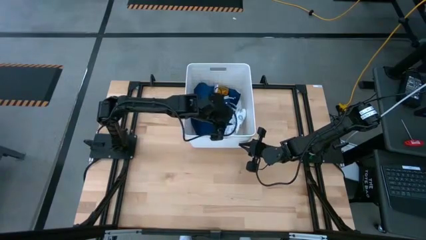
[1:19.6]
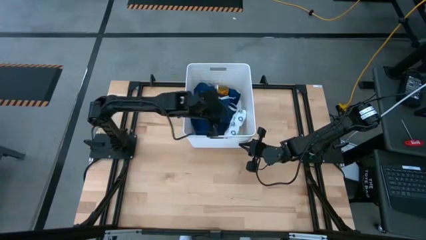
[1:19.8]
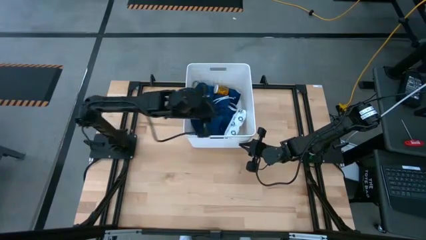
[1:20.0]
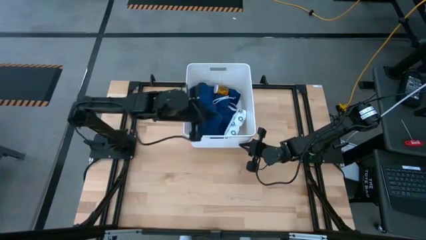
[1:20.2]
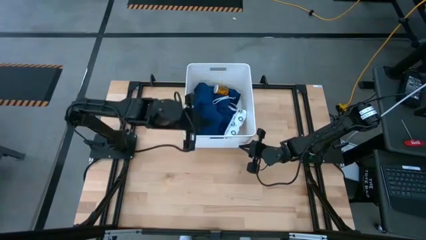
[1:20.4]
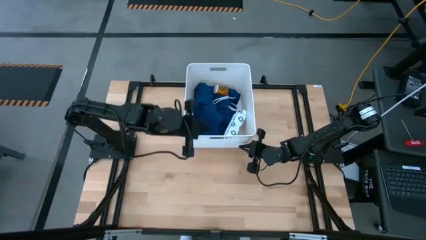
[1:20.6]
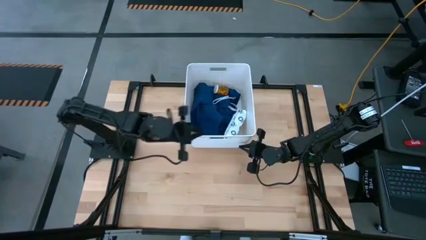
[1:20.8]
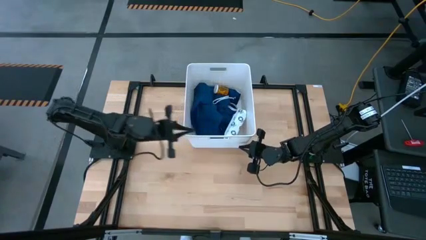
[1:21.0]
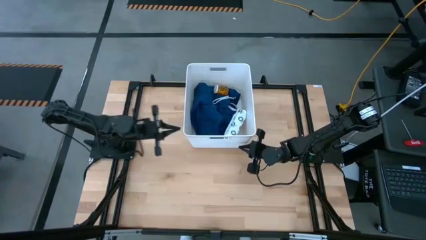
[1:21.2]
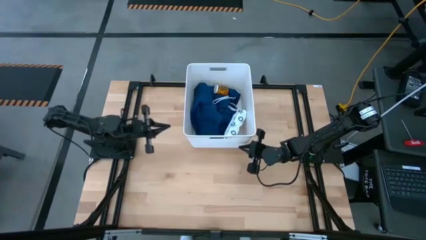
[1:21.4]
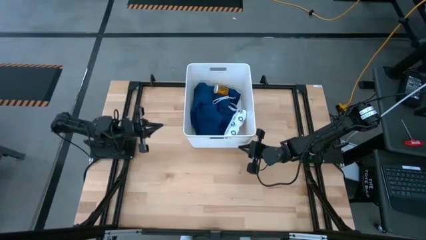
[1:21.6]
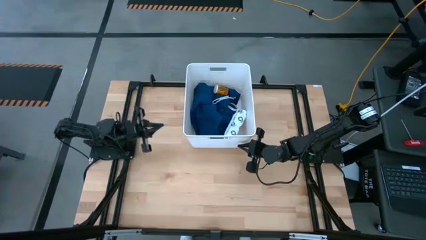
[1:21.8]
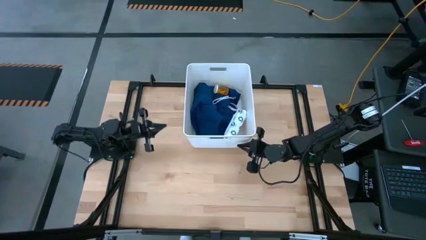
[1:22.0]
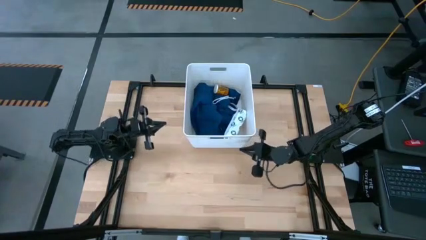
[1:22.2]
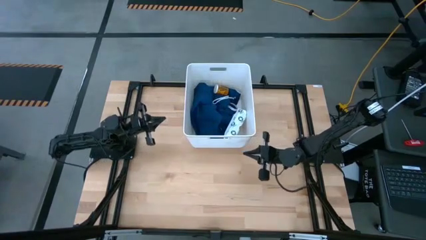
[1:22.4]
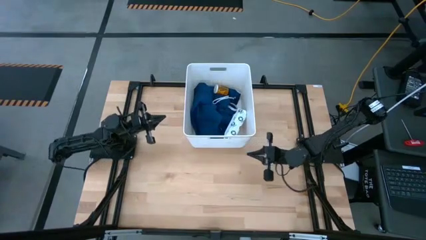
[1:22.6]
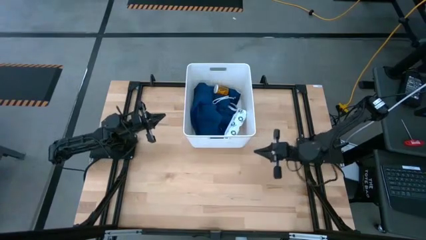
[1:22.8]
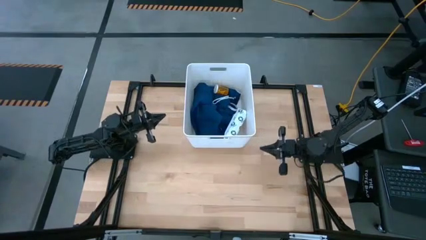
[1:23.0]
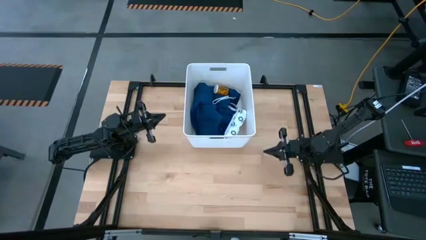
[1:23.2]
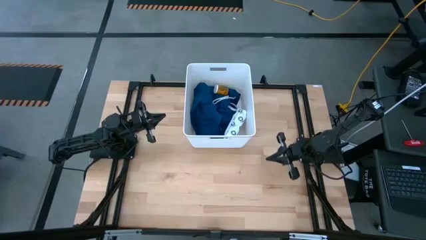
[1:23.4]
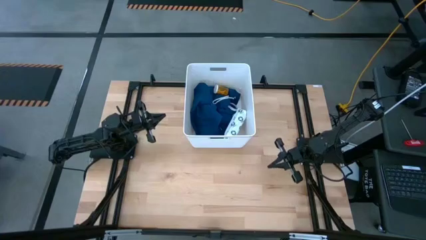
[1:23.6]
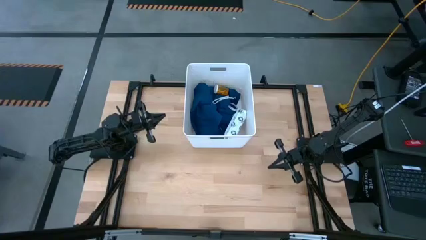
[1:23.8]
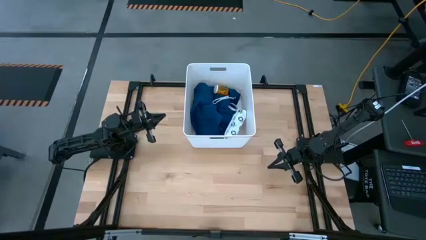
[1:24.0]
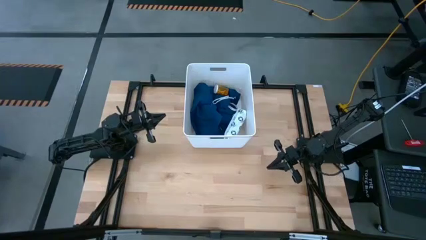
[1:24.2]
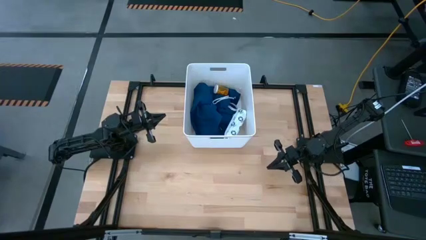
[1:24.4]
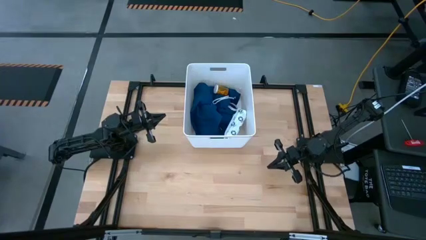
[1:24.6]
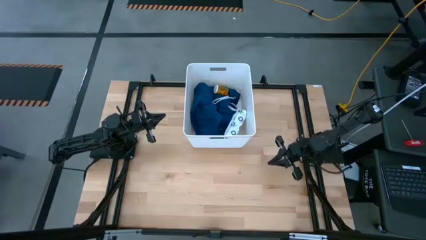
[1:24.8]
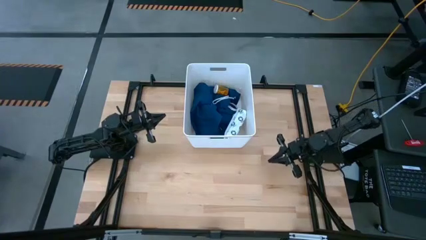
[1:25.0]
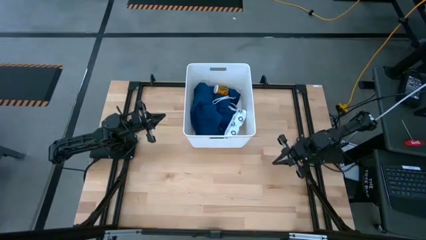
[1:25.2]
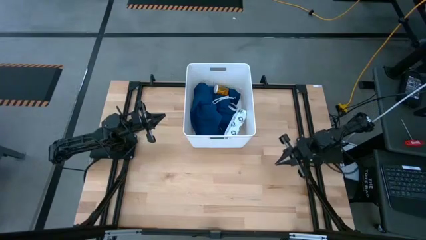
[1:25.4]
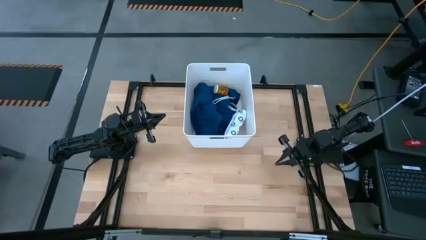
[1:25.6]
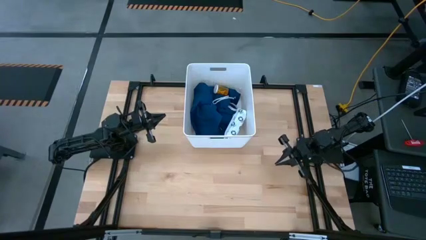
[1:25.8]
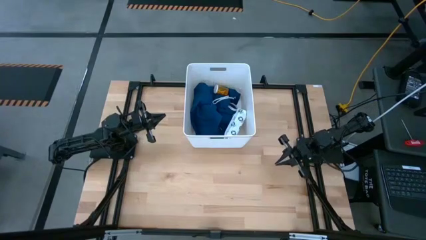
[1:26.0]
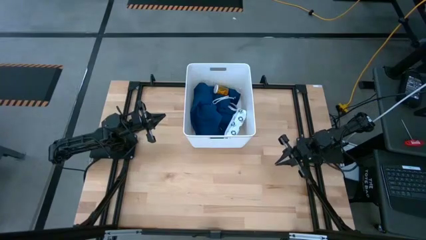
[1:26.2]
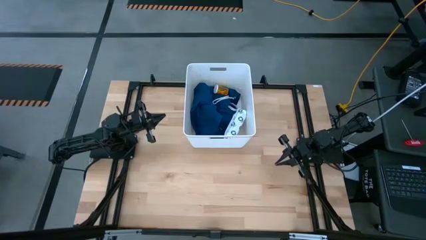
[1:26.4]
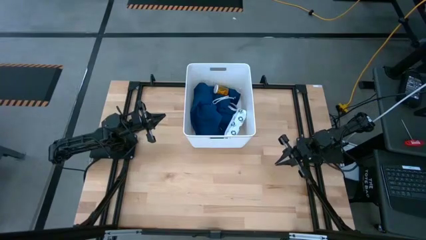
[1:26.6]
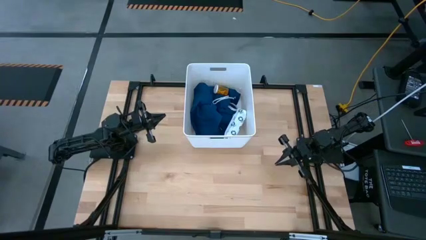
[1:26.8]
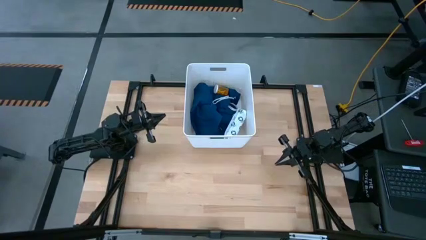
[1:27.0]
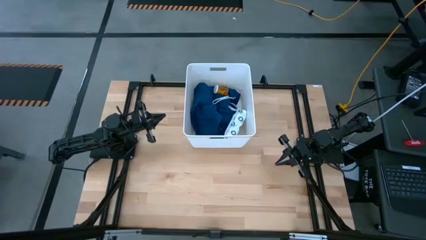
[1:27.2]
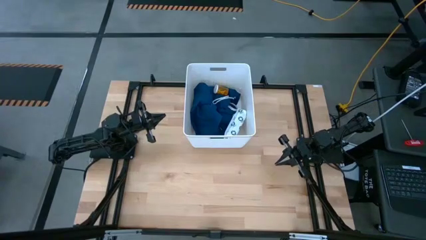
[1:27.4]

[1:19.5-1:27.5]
Task: Pick & place medical supplies in basket/bin
Return to Home Position

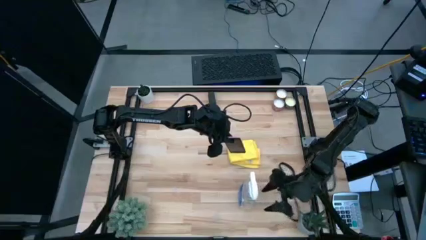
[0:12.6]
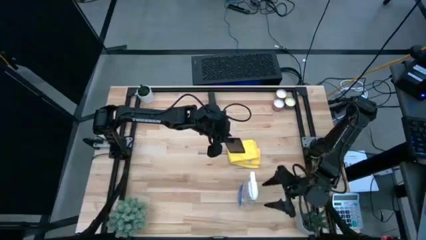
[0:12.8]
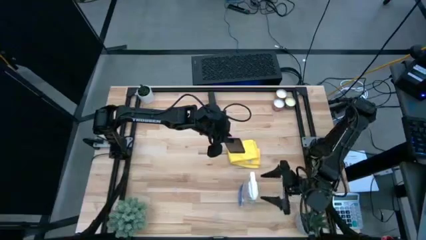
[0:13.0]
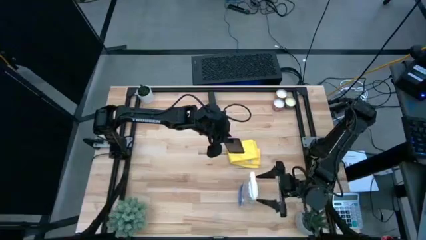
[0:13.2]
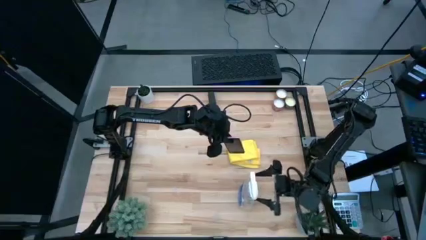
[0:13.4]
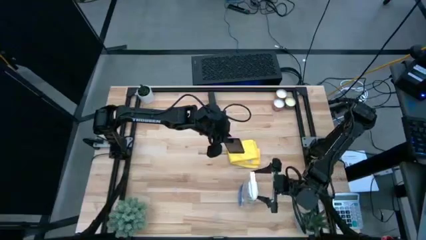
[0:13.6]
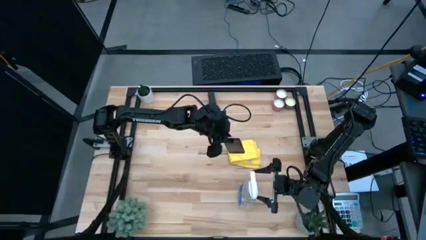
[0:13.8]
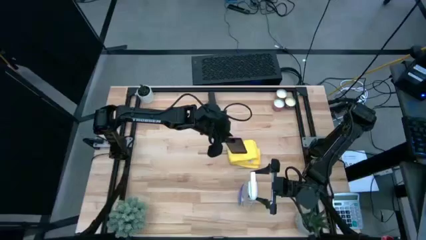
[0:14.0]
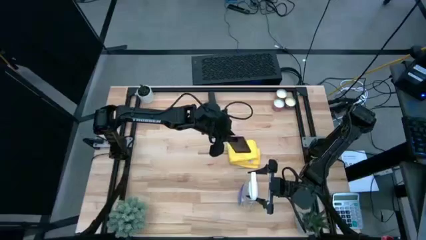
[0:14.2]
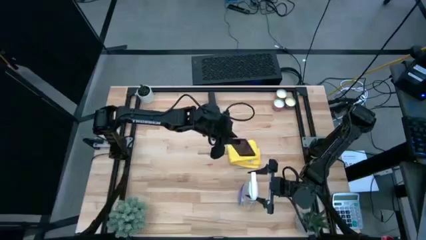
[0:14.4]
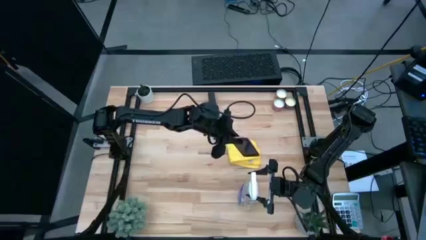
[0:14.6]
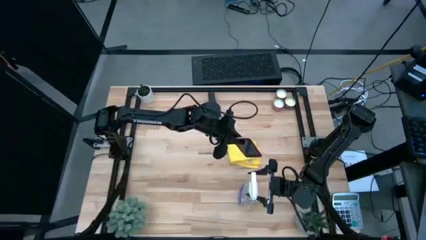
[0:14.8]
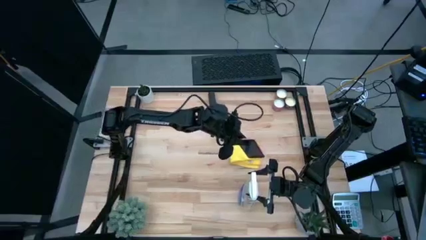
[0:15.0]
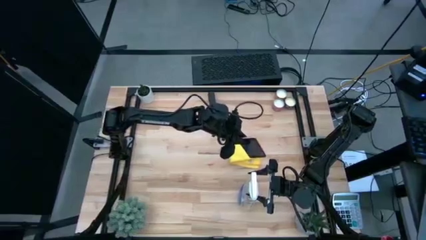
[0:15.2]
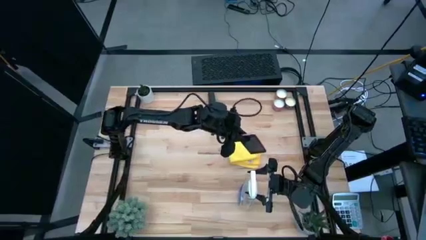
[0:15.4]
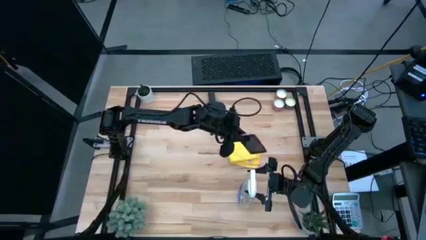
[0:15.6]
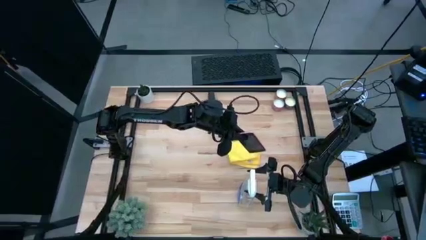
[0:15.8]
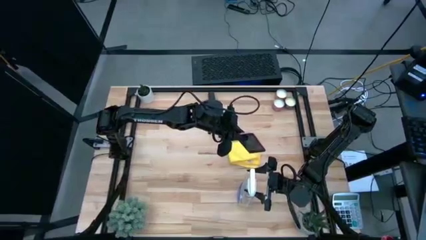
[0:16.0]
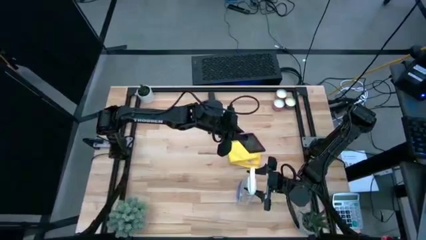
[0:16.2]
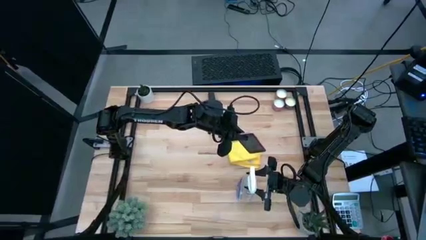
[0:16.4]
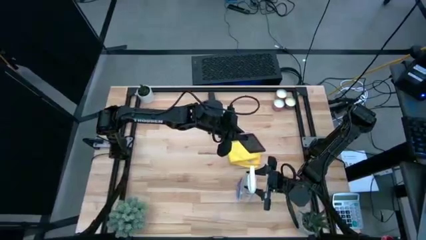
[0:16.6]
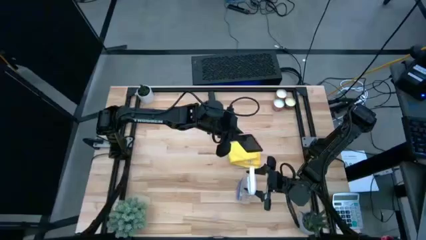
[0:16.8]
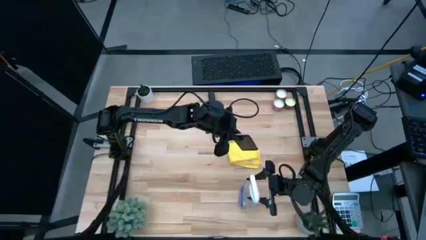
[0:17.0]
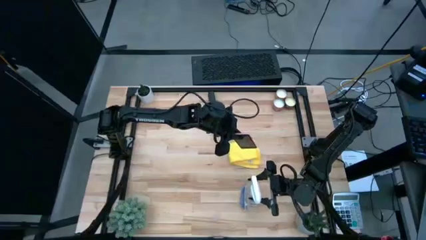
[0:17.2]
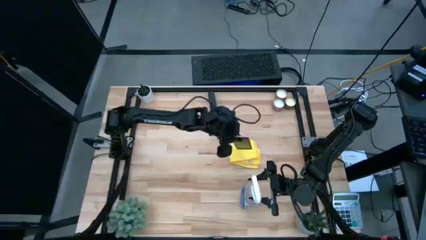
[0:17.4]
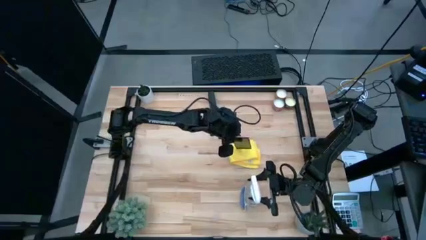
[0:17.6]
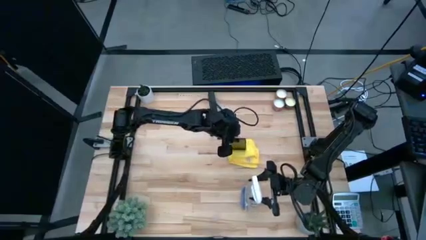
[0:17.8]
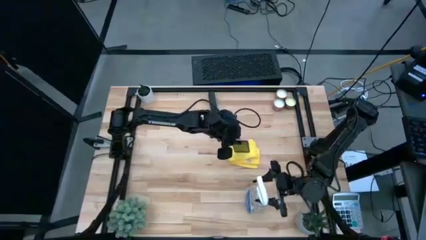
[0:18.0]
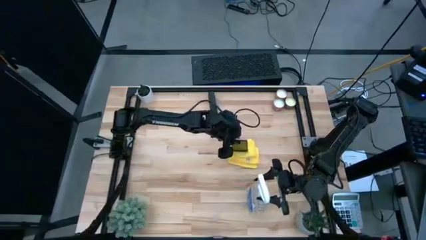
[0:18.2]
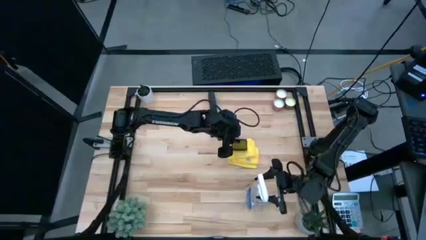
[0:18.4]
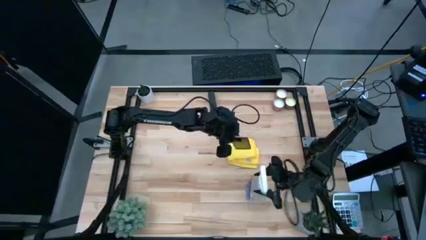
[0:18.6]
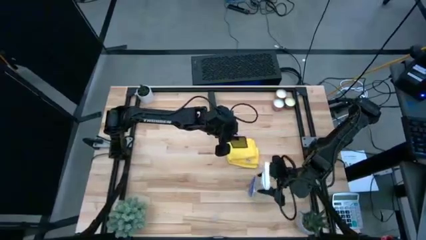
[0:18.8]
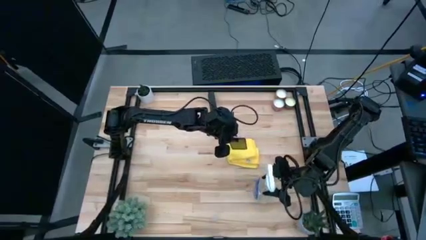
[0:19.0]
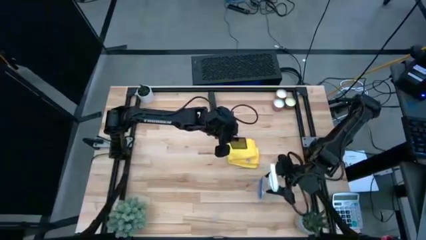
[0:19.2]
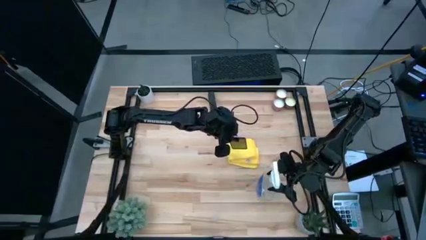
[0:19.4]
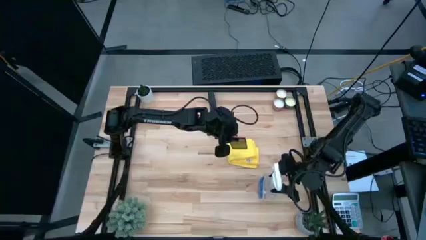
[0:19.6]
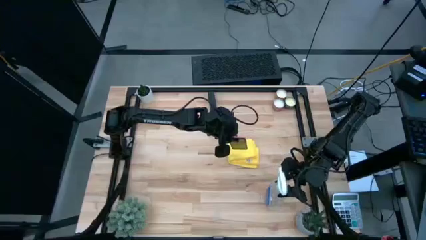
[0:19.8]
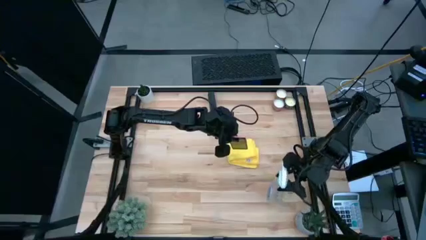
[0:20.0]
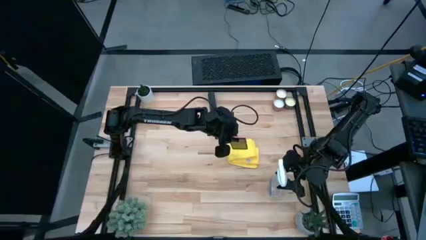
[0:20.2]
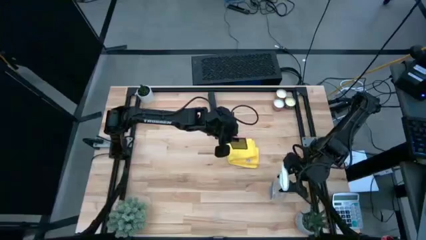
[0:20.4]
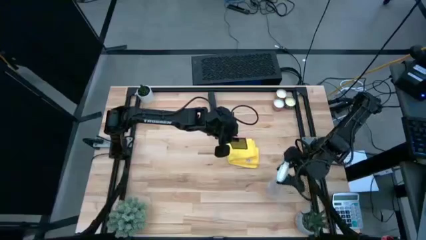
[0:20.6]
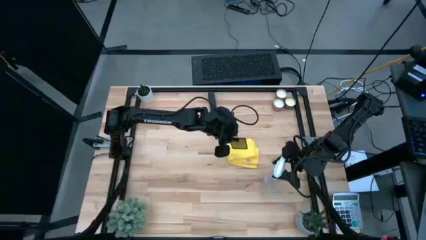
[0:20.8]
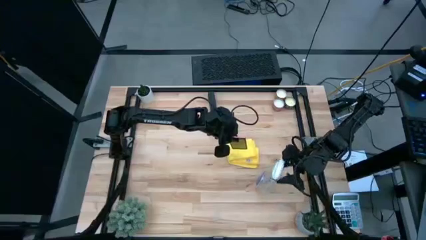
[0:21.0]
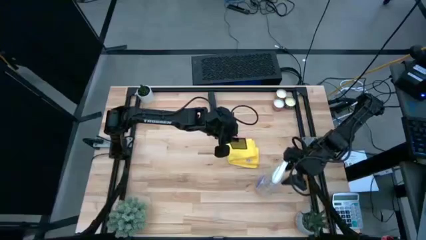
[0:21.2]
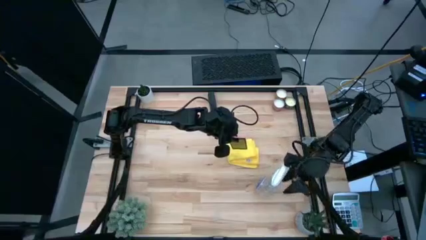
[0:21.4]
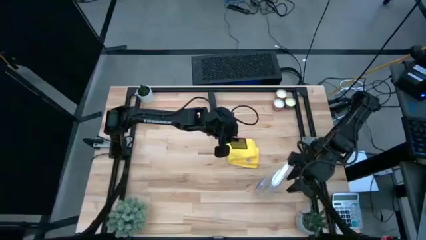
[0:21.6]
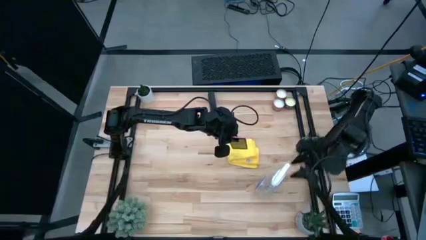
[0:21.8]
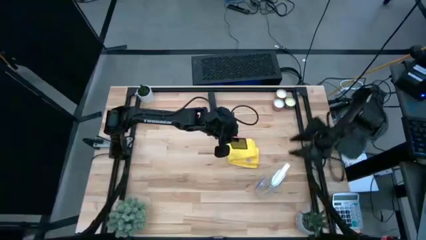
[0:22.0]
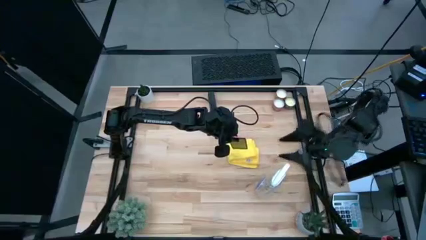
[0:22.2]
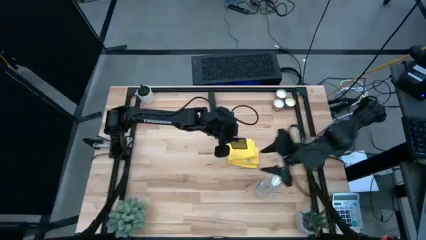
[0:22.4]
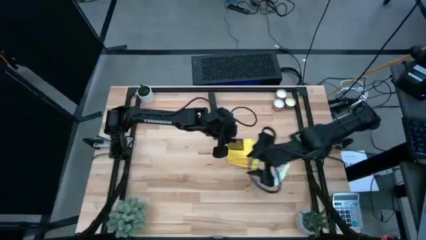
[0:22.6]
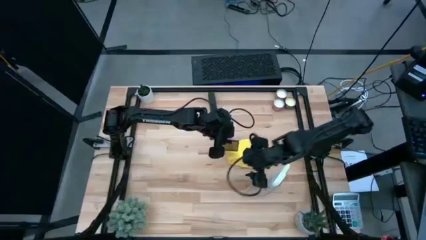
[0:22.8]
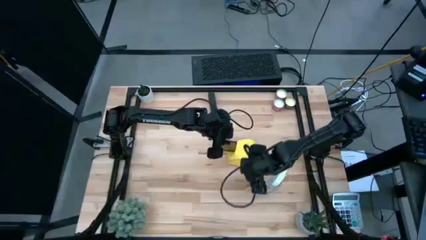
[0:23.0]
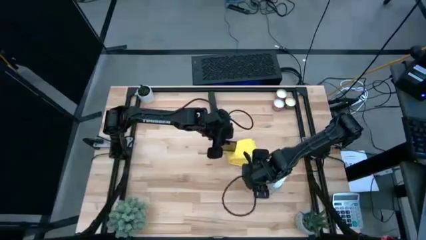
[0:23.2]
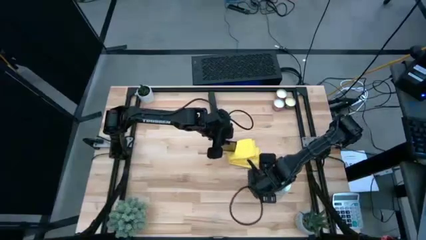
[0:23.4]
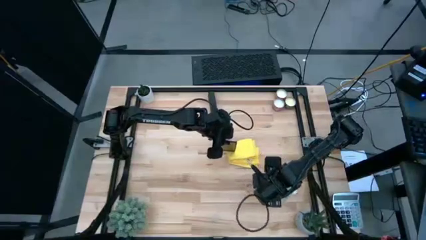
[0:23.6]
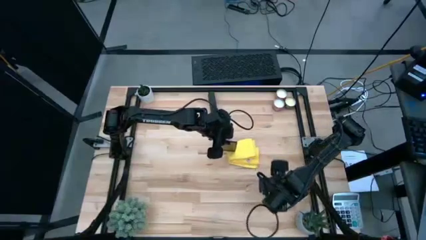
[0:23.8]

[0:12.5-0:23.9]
Task: Apply microfiber cloth
Spray the cellphone using a spray bottle
